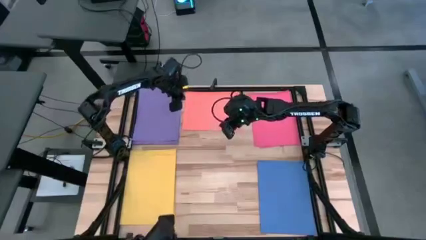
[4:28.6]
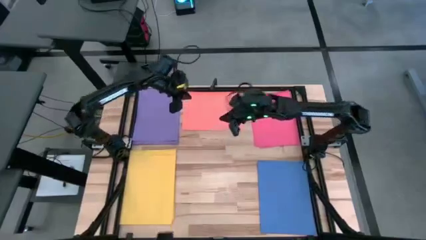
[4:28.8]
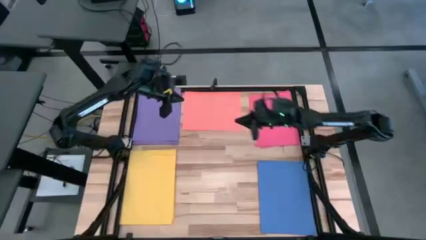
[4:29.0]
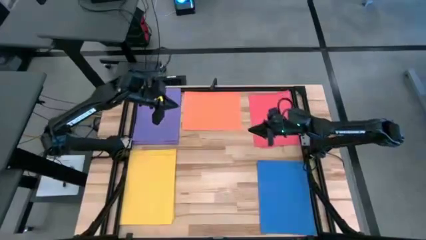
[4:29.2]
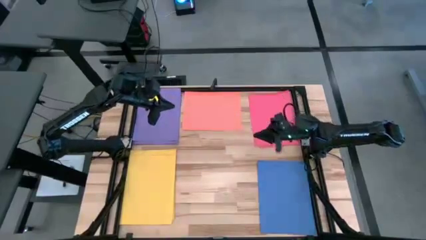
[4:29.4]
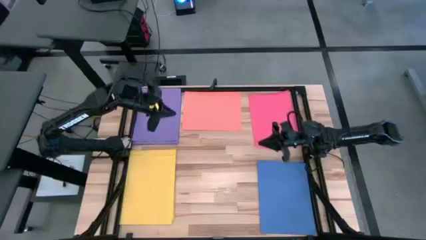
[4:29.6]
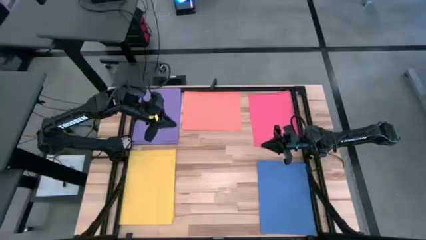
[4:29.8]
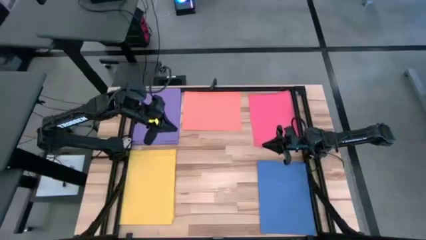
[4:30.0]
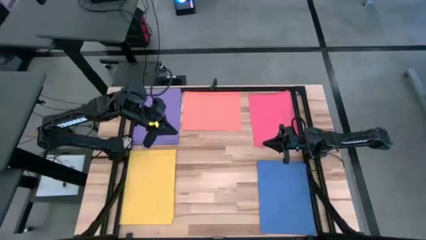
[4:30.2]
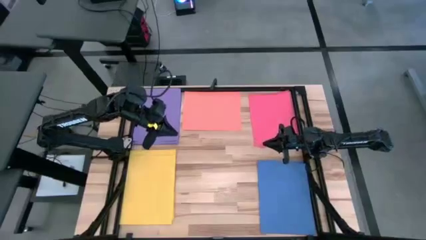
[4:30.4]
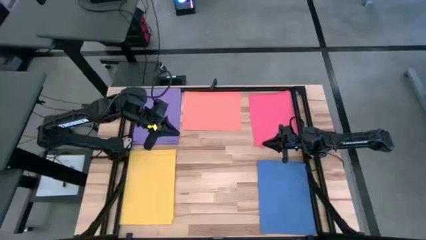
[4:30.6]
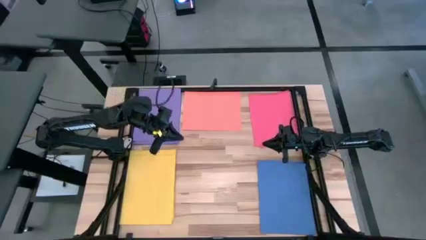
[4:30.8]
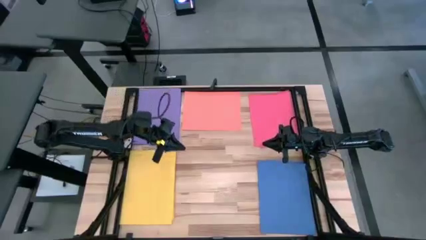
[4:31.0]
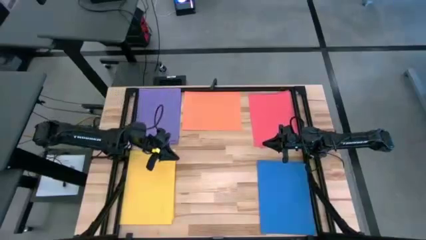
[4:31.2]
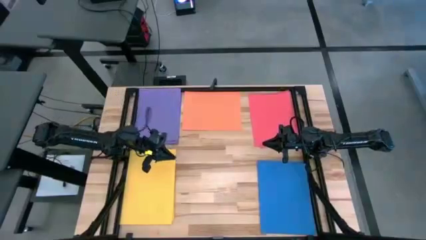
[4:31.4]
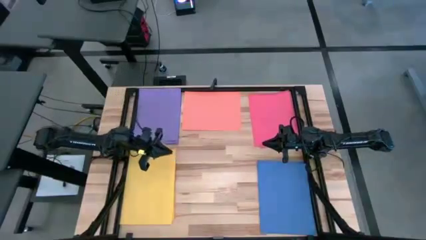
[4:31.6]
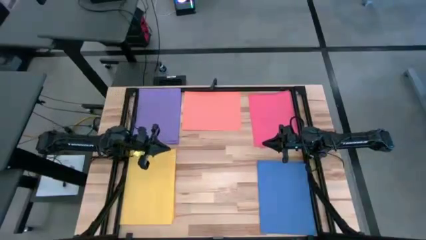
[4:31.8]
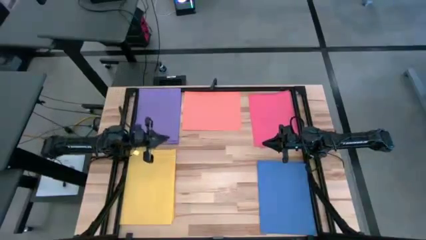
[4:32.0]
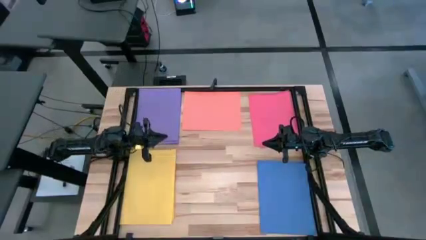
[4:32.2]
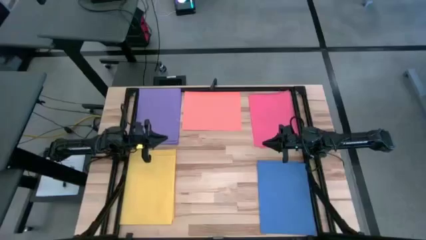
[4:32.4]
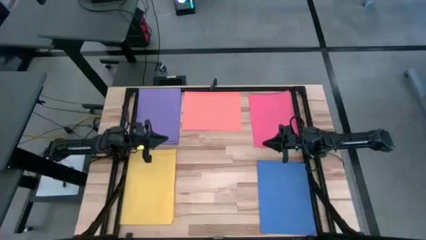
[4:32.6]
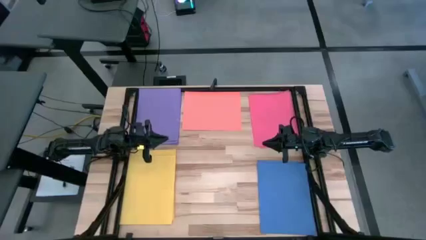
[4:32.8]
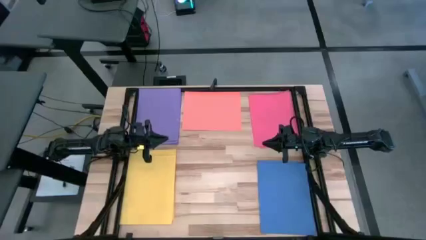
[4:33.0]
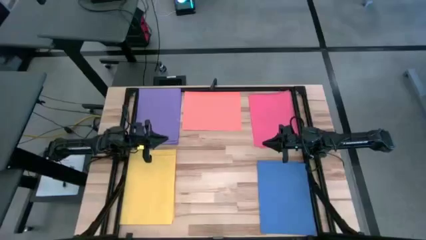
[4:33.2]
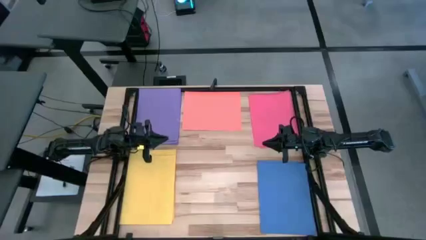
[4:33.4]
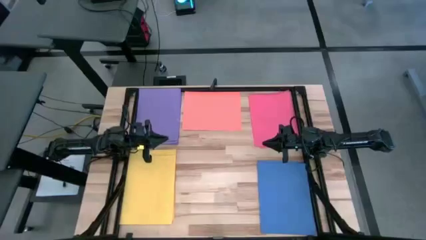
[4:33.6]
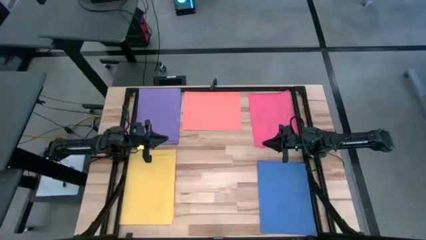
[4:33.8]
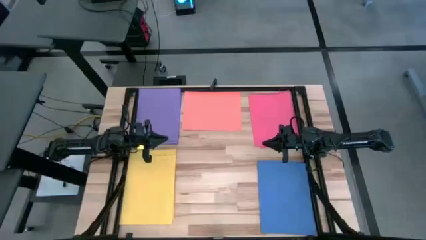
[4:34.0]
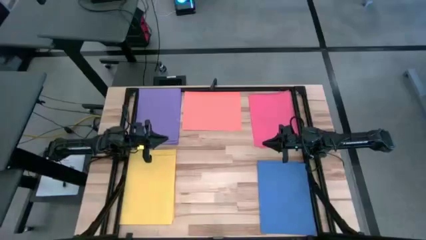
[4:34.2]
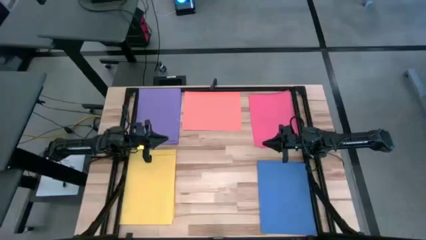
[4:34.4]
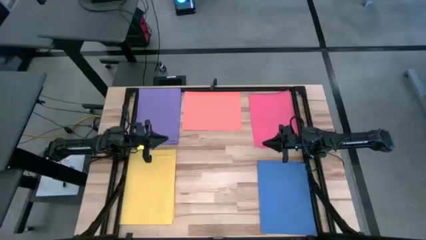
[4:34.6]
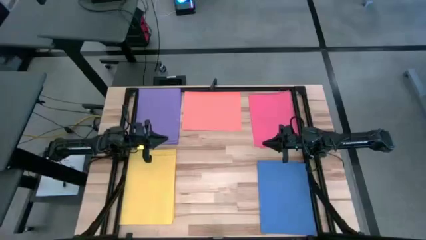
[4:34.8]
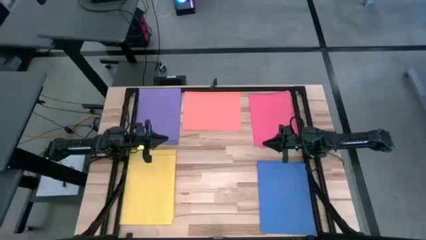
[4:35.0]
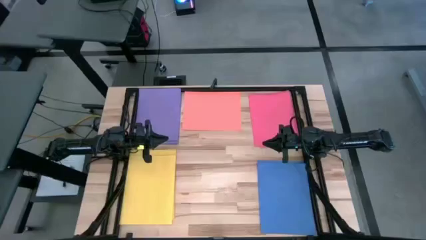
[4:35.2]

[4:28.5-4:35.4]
Task: Organize paper
Return to Home Position

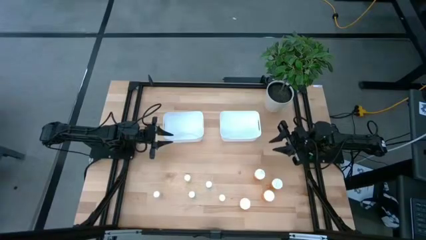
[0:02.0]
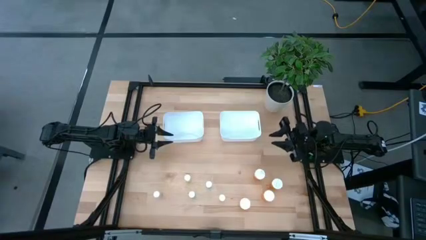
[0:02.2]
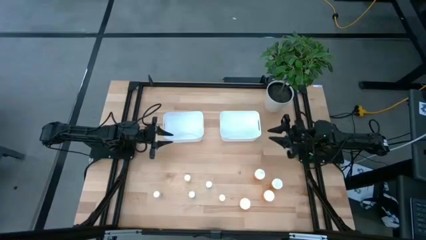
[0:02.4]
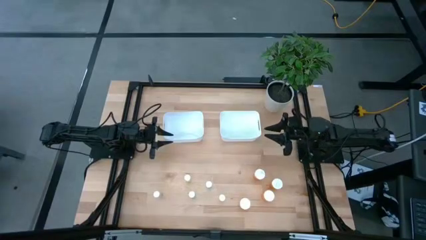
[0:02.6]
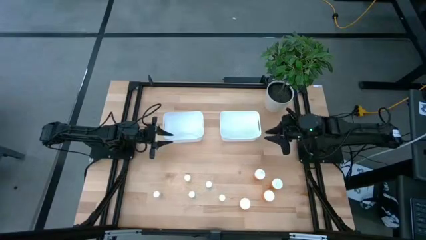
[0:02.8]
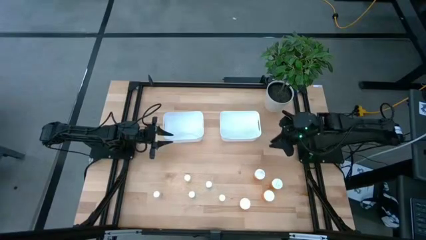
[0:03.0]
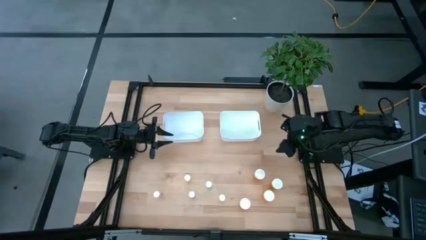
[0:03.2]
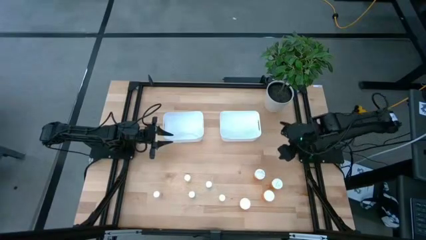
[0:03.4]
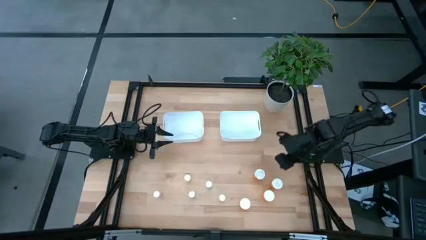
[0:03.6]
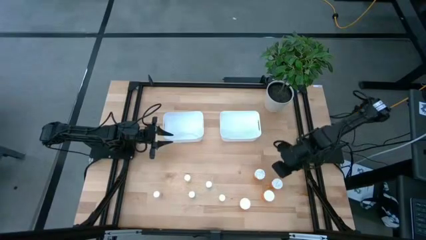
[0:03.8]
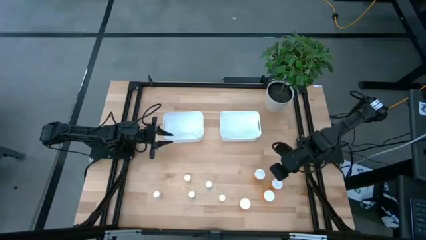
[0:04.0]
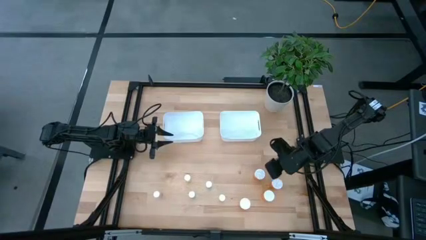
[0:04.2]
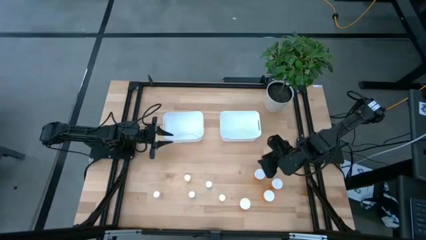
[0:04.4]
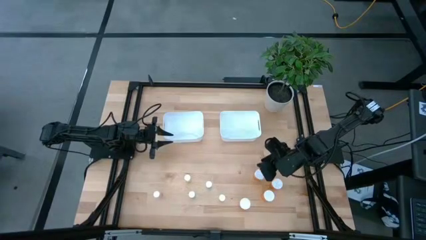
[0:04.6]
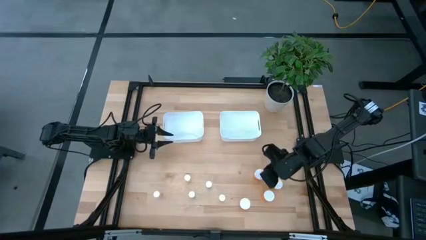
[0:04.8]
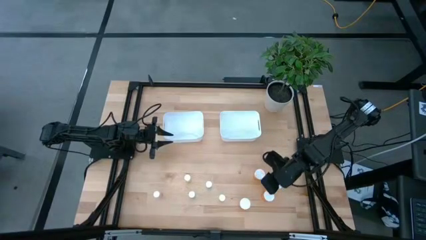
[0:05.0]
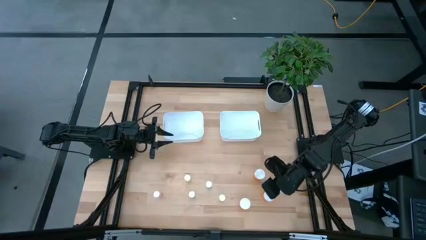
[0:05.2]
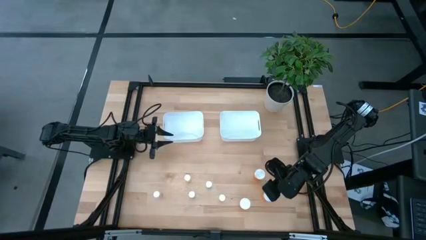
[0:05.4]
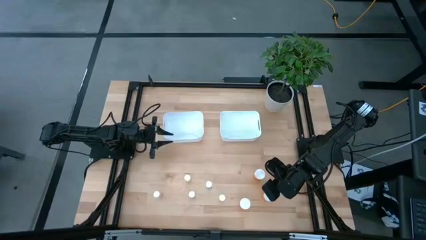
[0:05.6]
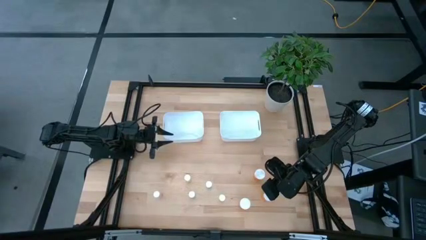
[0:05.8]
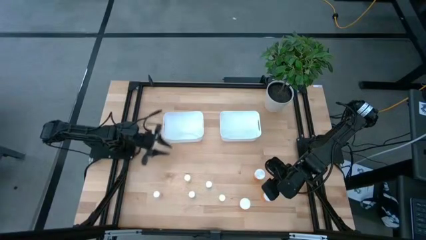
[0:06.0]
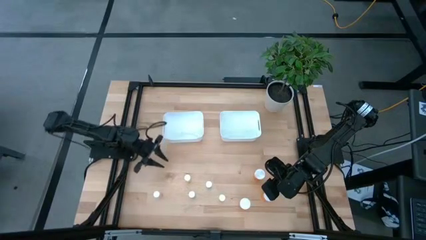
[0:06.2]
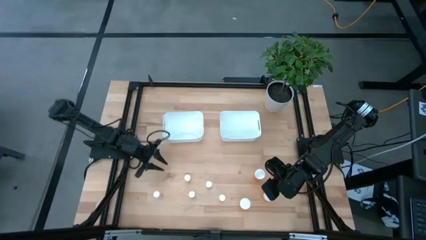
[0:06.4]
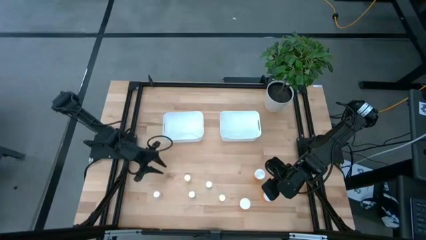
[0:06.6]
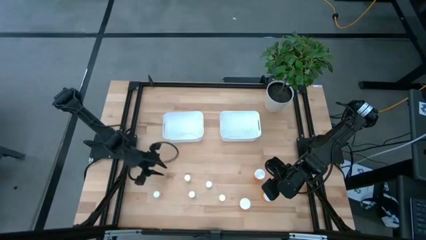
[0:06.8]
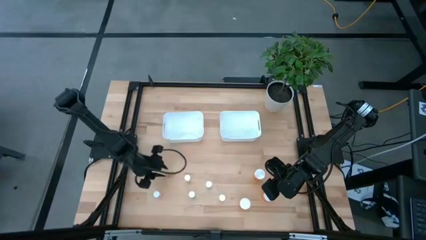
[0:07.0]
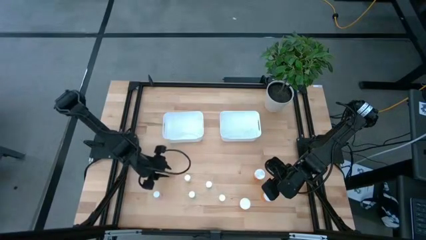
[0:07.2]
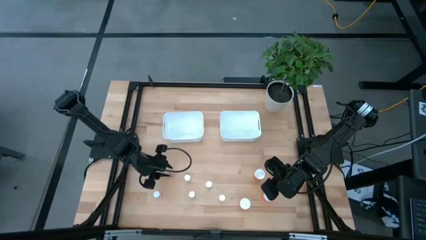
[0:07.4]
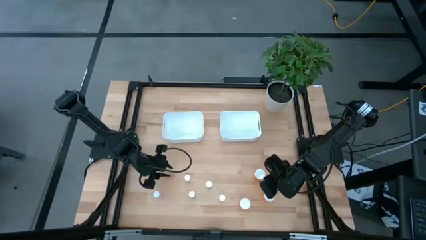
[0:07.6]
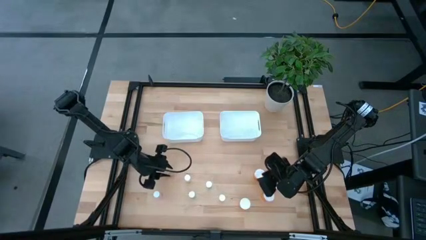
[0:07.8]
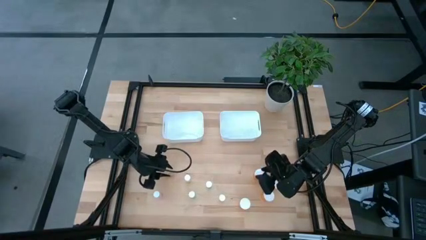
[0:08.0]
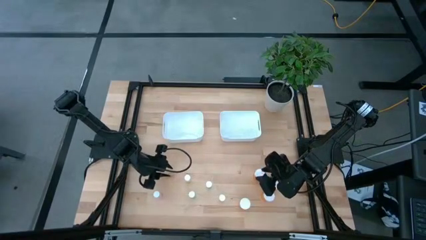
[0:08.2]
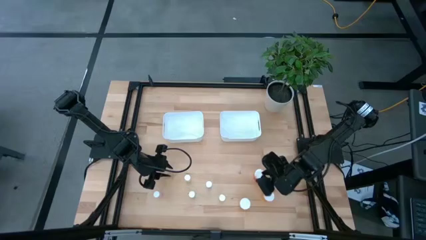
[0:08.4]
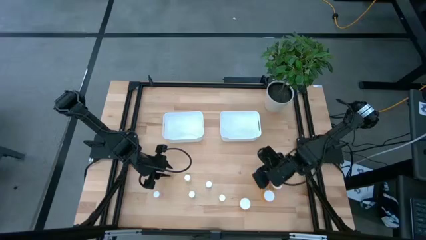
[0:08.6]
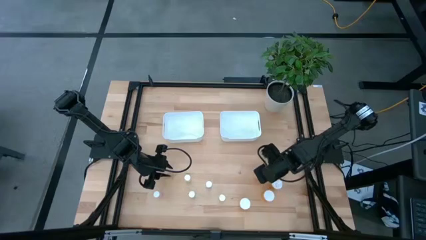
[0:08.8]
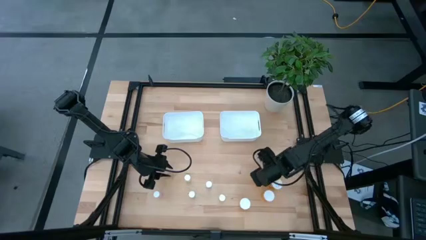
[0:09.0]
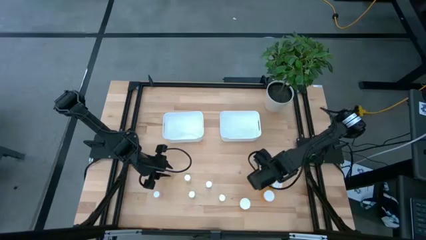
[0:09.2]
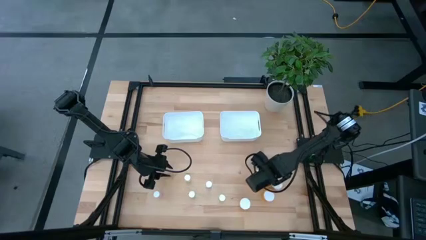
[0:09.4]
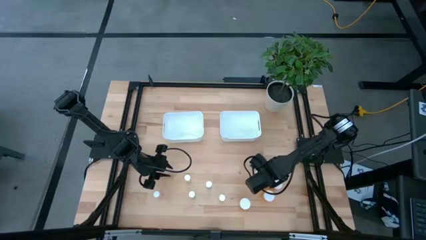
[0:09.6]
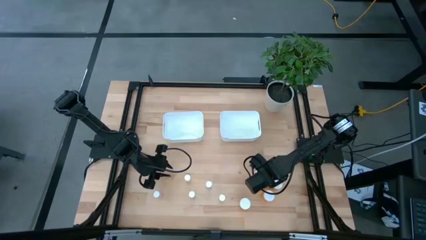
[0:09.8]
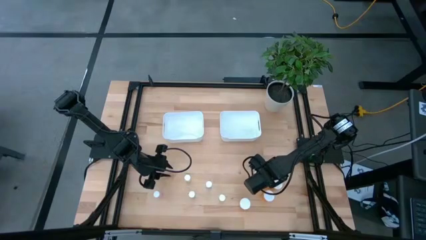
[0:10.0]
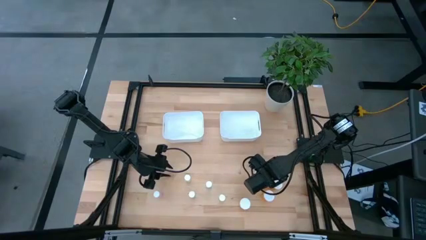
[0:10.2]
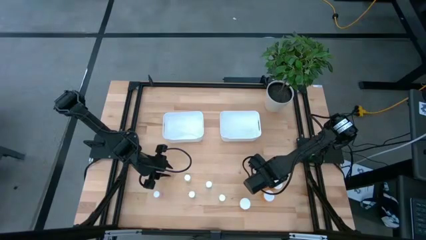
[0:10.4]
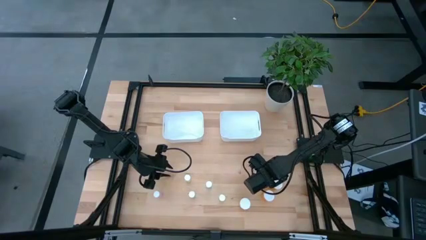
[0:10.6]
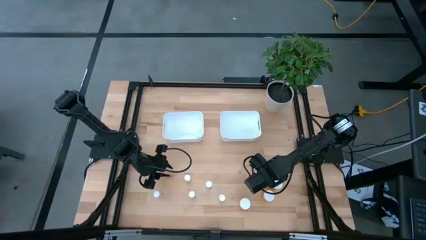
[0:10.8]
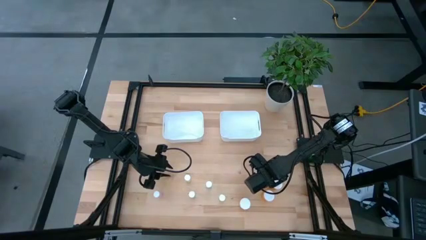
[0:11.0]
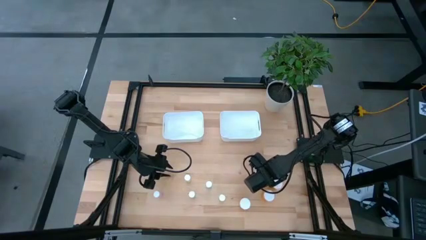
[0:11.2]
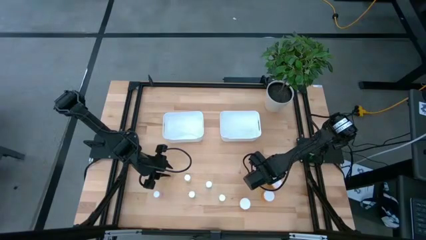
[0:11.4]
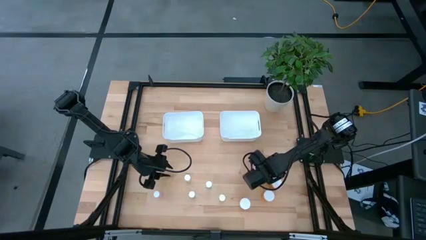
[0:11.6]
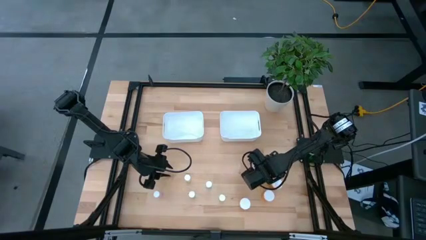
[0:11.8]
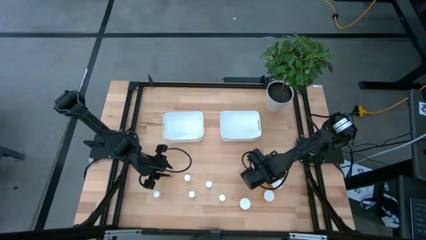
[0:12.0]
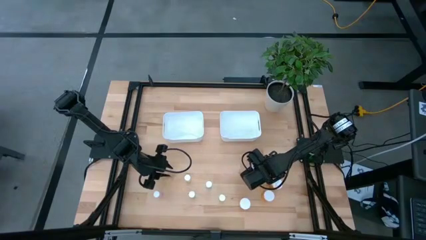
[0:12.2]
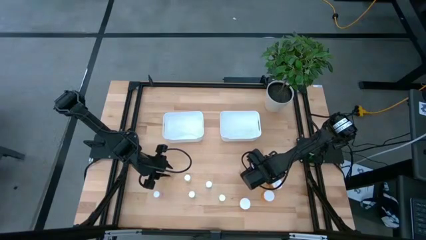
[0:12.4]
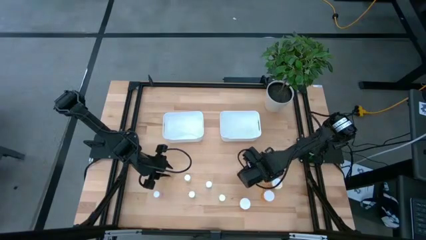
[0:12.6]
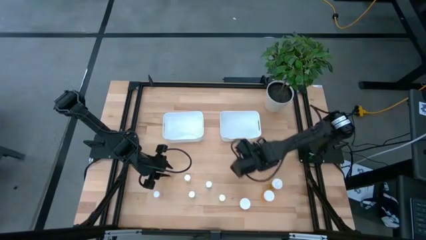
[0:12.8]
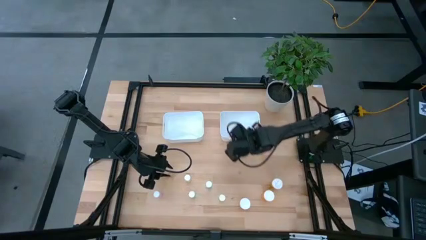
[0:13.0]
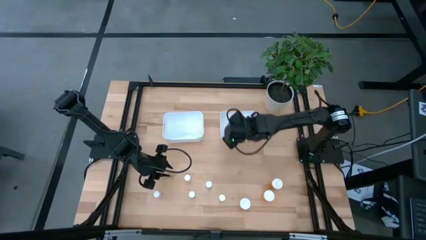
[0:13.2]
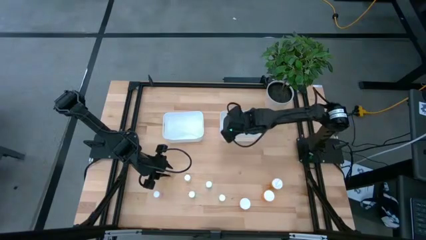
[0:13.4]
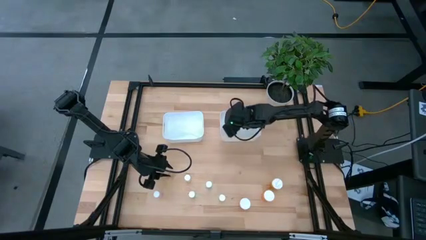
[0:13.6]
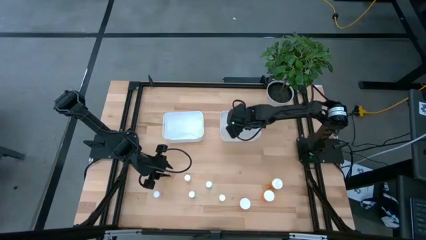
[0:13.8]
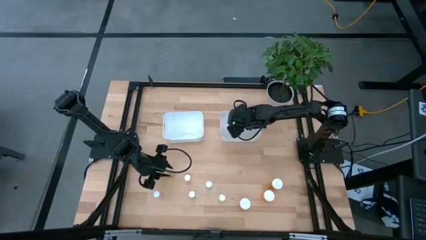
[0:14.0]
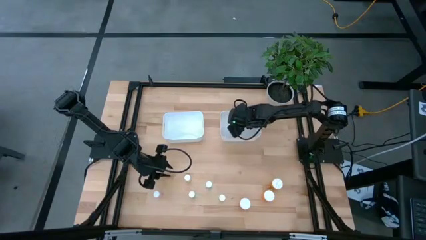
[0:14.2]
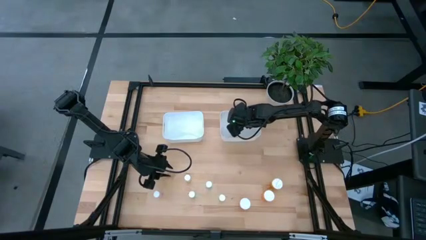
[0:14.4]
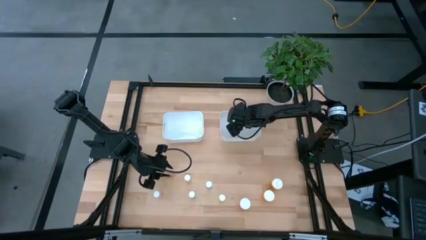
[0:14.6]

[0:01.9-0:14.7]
Task: Pick and place medicine bottles into bin by pill shape (circle, oval)
Put the top orange pill bottle into the right white bin
